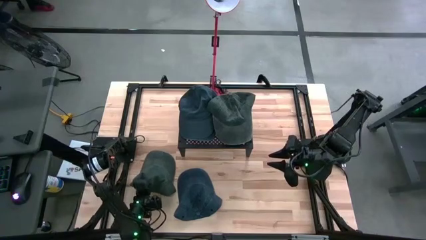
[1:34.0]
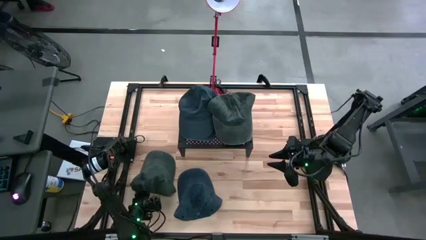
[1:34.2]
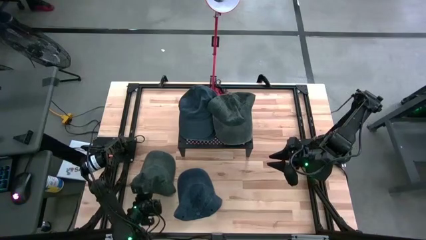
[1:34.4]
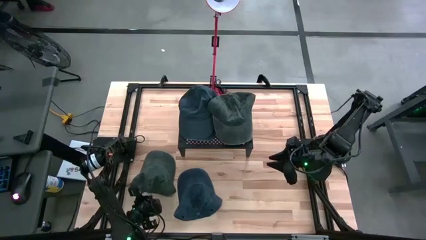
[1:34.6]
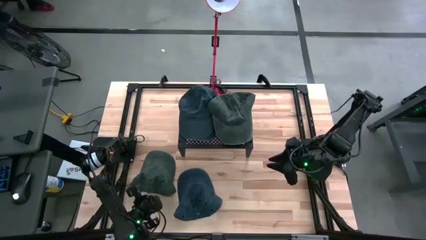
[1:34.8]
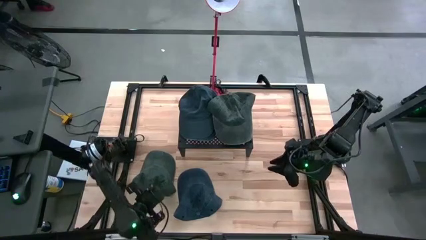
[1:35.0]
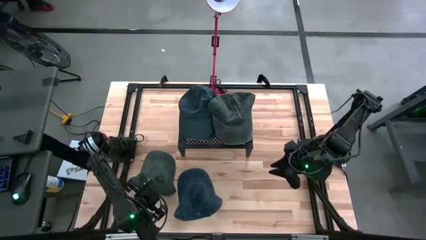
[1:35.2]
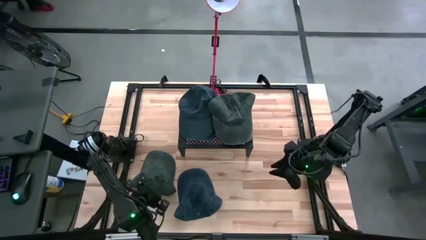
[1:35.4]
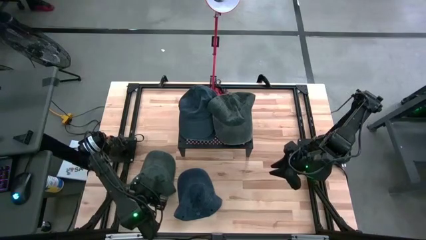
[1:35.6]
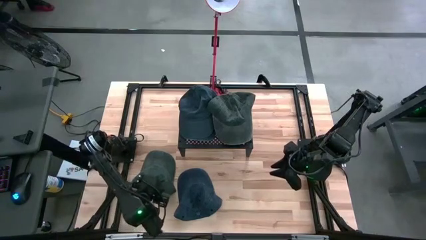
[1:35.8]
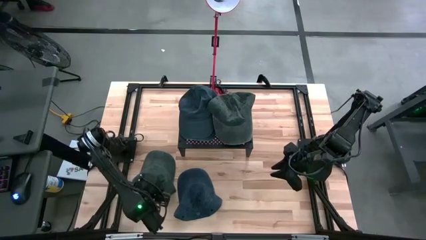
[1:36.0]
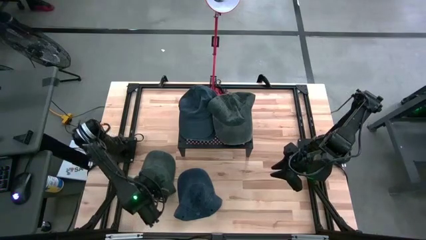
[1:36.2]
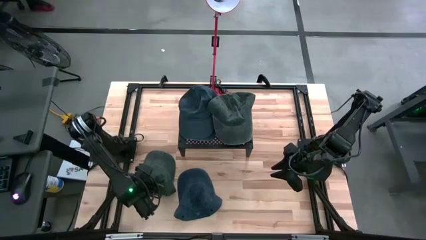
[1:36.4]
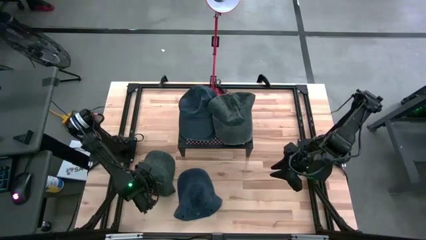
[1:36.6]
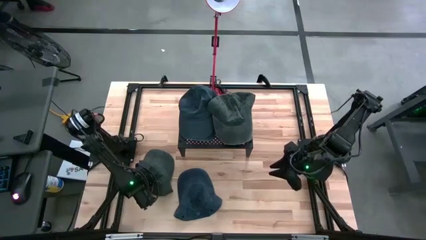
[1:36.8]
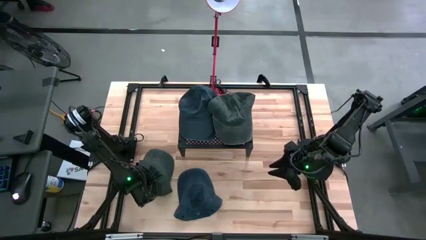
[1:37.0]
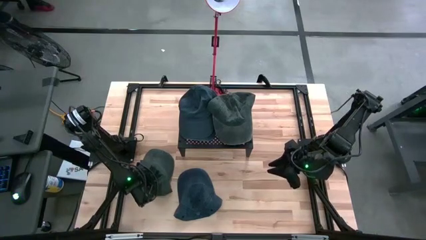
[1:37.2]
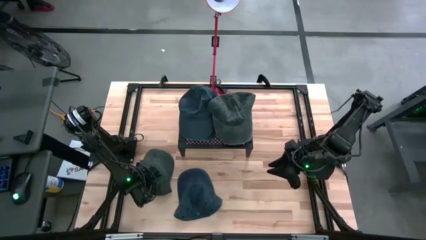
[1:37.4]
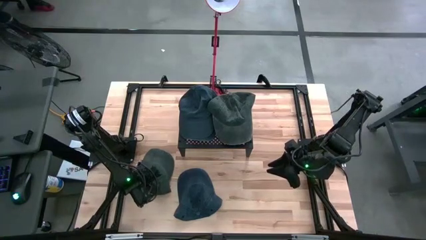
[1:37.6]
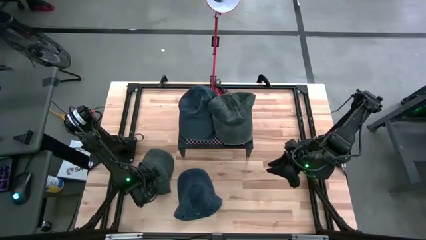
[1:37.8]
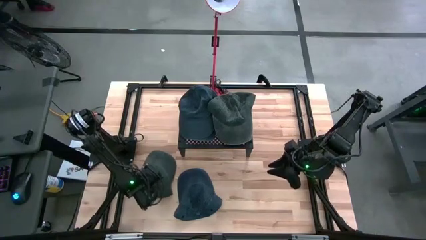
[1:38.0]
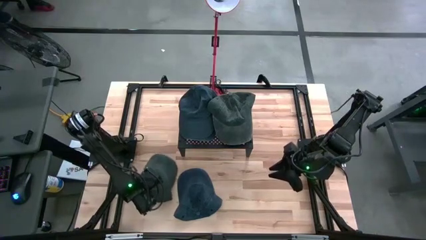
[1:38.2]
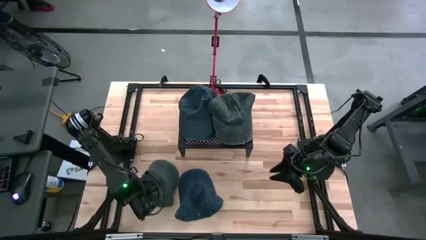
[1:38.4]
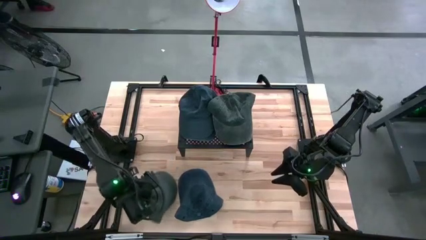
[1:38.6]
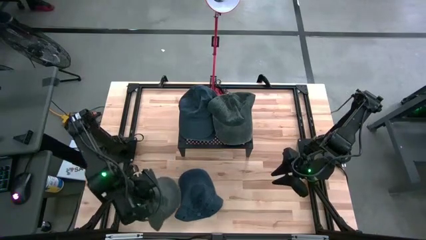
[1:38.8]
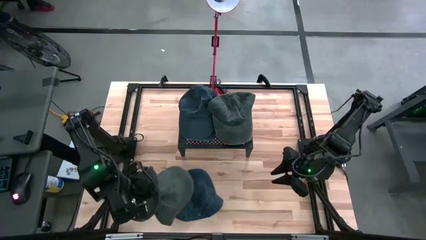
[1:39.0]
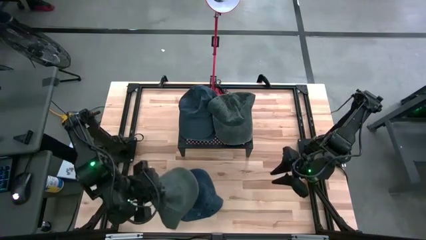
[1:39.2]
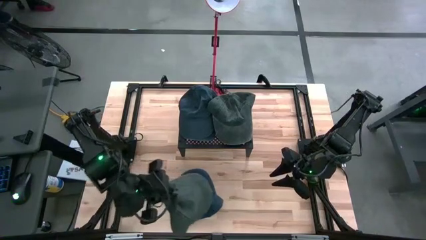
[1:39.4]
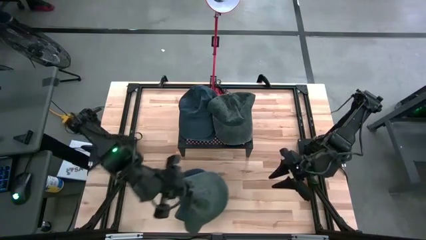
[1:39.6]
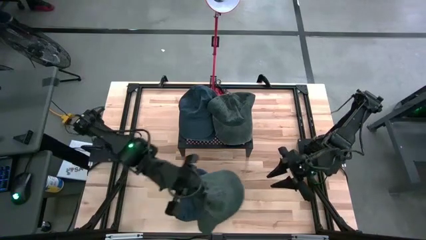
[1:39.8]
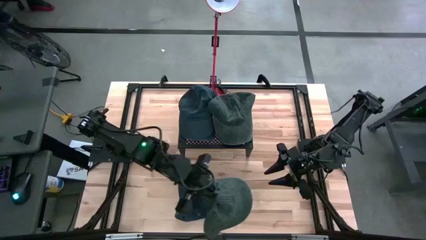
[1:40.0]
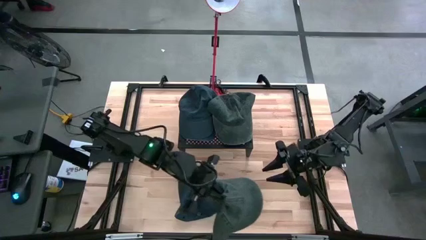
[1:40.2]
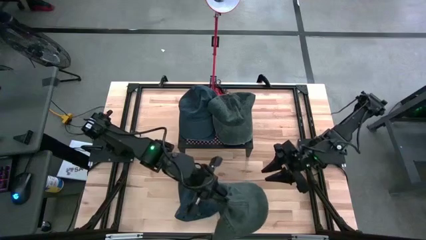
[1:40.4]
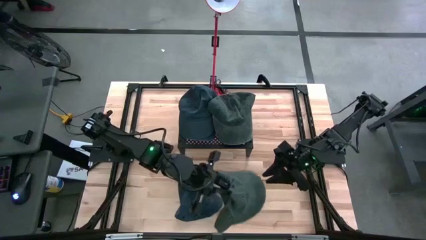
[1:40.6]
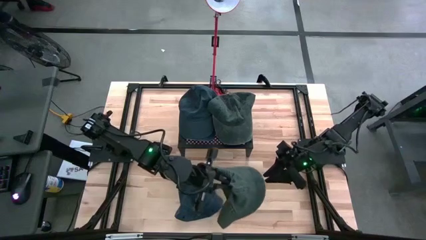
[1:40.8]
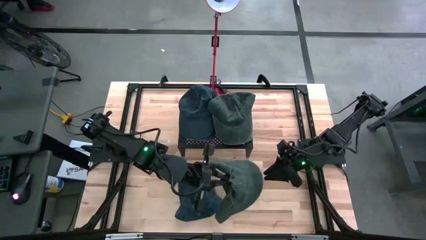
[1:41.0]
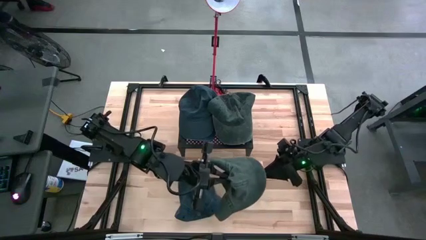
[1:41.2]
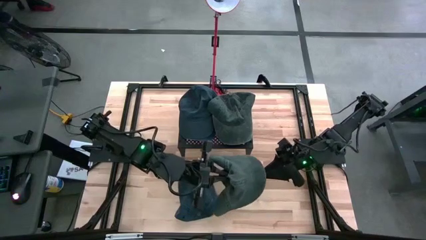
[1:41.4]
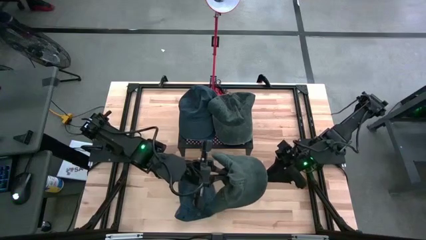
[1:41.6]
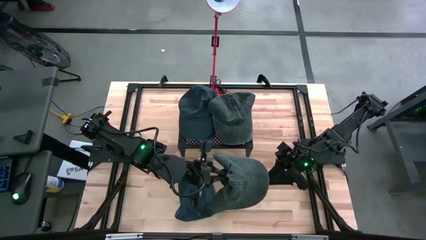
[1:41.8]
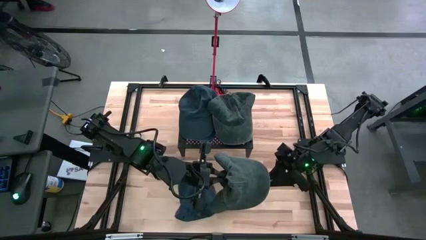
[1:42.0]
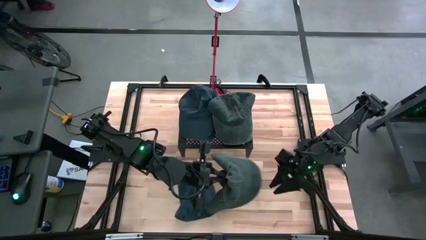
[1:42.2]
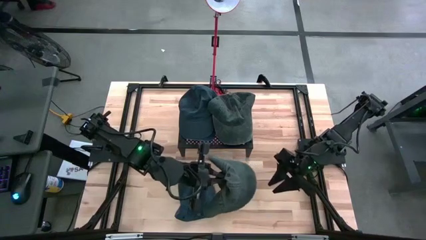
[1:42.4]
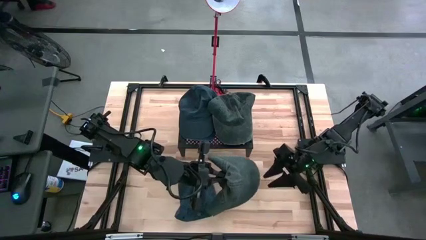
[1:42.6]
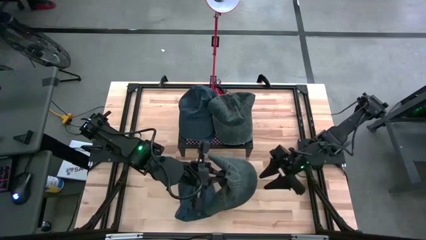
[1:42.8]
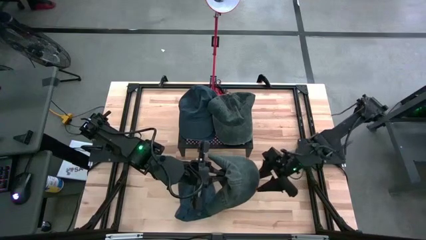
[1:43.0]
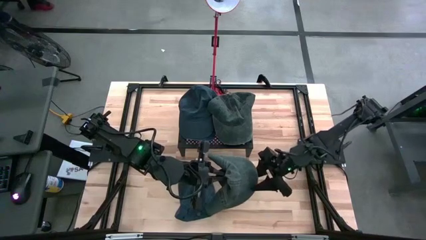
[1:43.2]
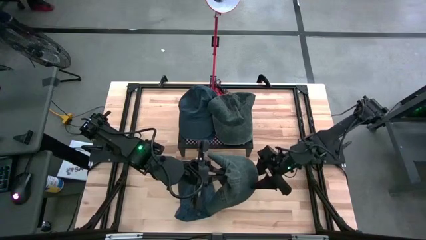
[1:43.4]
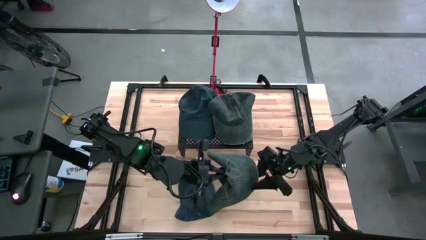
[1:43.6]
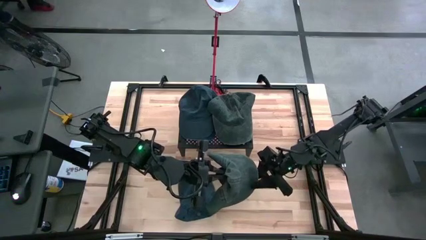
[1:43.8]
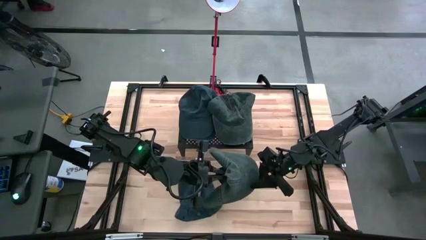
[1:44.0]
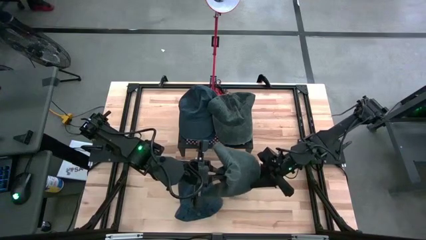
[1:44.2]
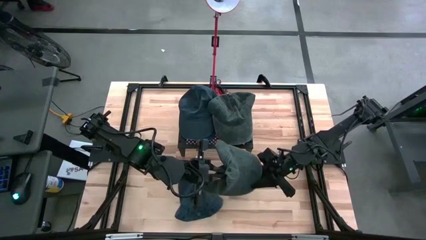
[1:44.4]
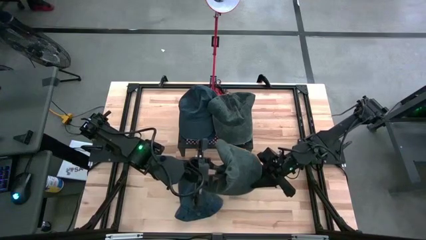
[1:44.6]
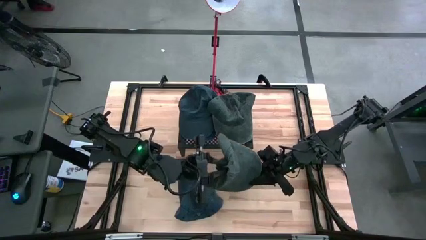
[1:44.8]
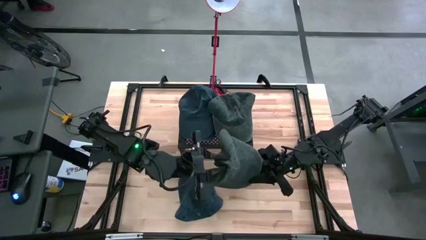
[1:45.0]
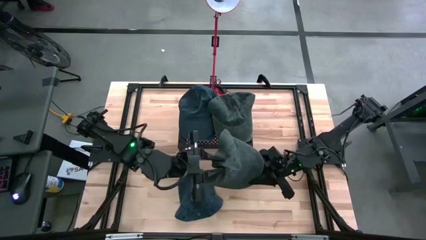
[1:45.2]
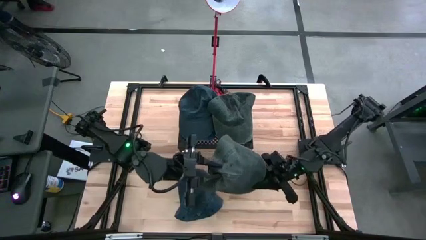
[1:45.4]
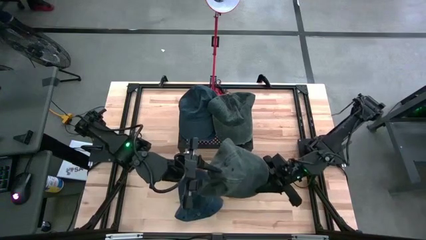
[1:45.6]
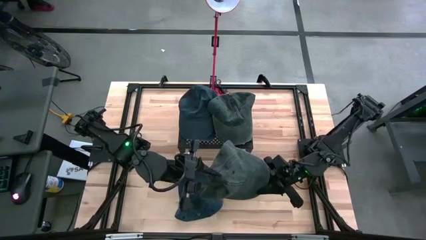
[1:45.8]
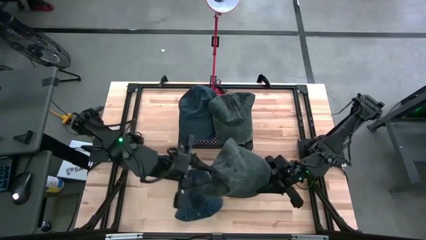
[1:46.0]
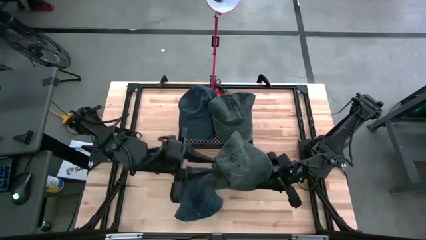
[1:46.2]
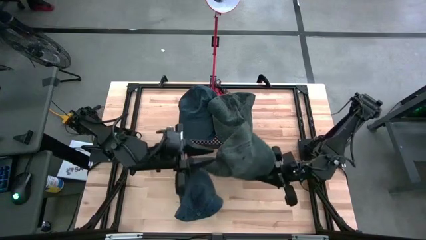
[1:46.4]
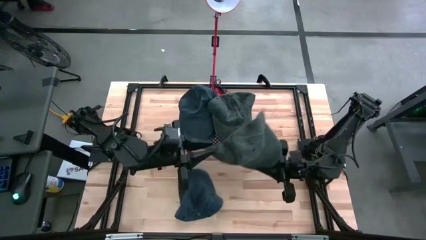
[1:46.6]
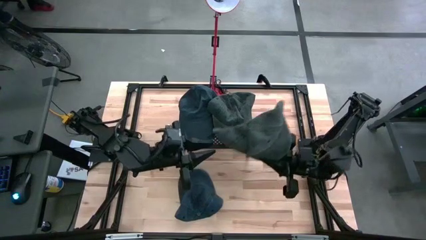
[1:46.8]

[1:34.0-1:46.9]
Task: Pick & Place hat
Stack the gray cap on top of the gray cap on the shelf

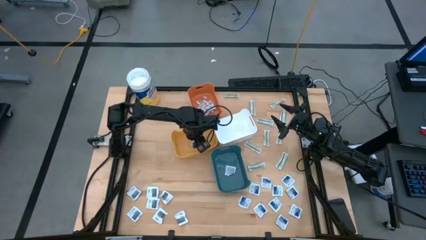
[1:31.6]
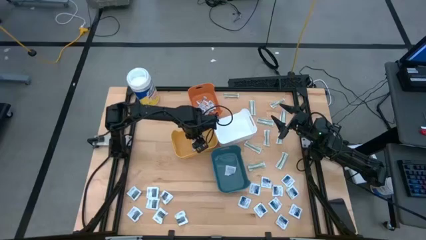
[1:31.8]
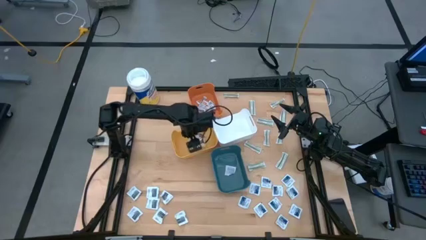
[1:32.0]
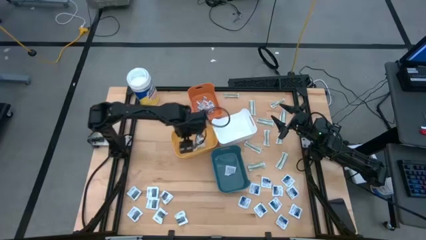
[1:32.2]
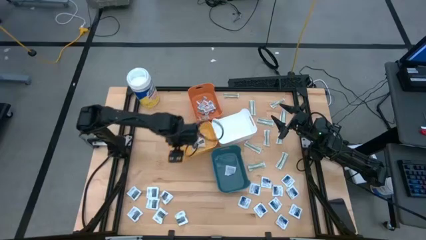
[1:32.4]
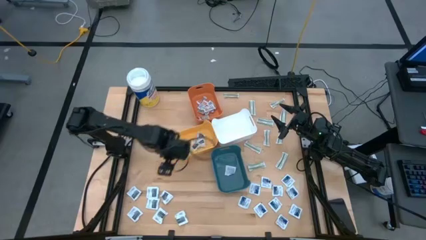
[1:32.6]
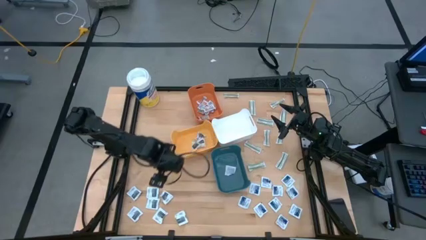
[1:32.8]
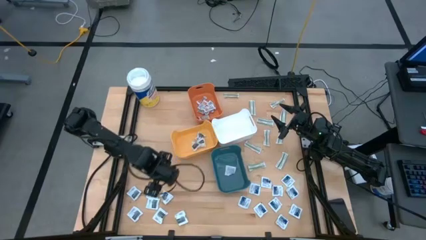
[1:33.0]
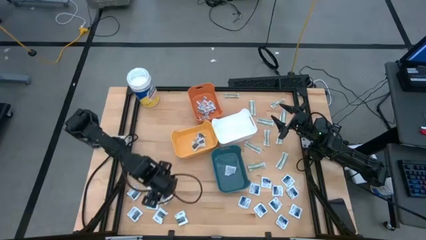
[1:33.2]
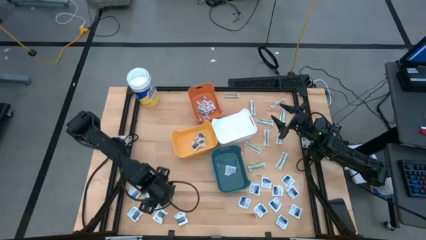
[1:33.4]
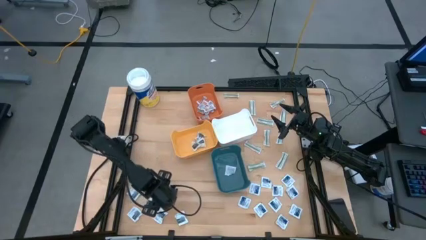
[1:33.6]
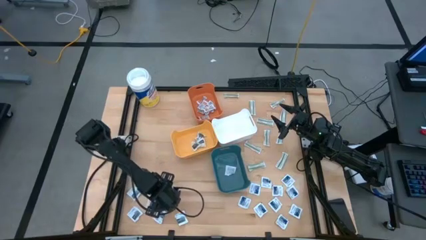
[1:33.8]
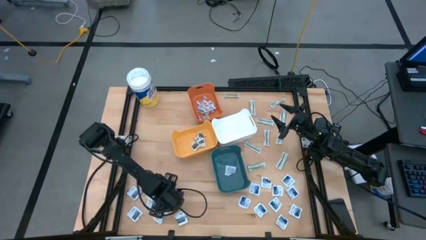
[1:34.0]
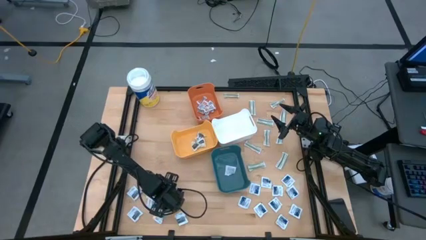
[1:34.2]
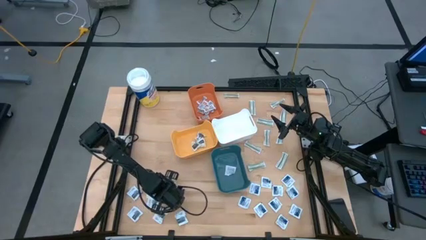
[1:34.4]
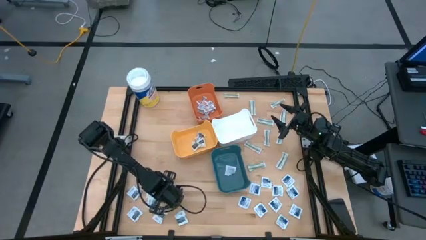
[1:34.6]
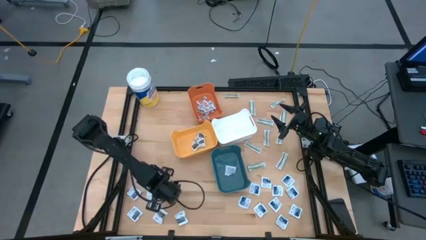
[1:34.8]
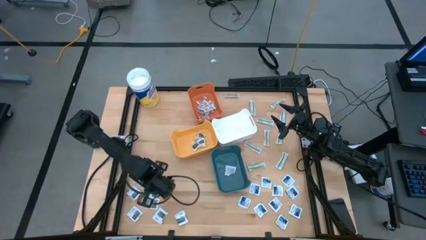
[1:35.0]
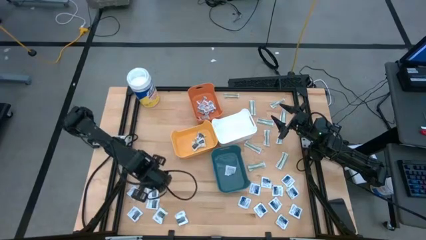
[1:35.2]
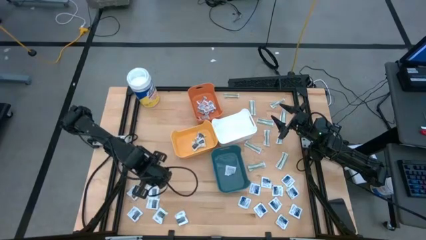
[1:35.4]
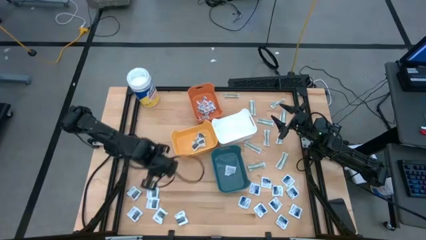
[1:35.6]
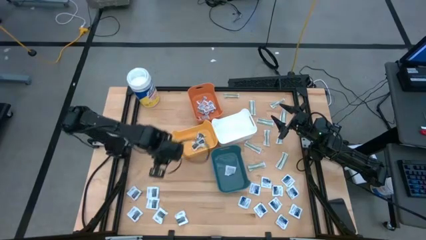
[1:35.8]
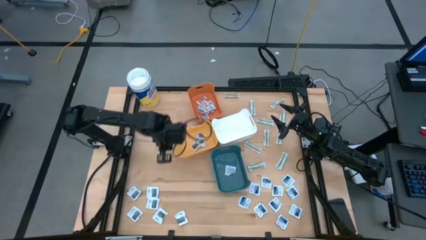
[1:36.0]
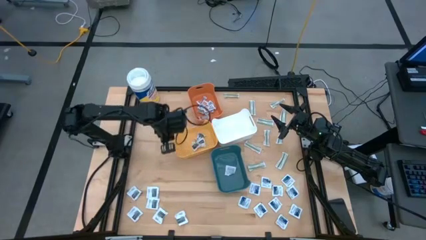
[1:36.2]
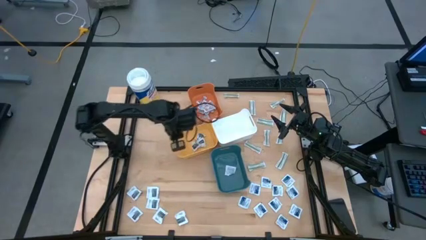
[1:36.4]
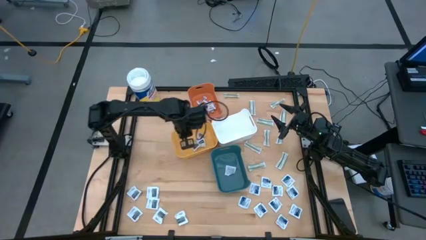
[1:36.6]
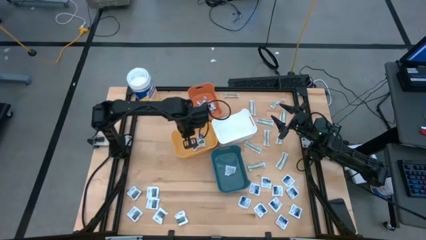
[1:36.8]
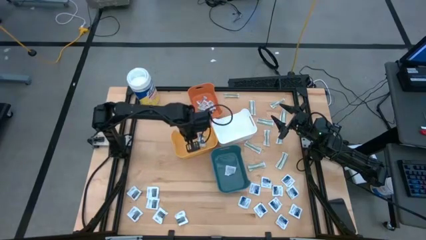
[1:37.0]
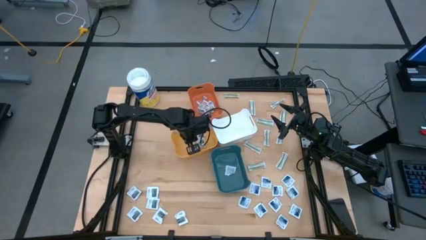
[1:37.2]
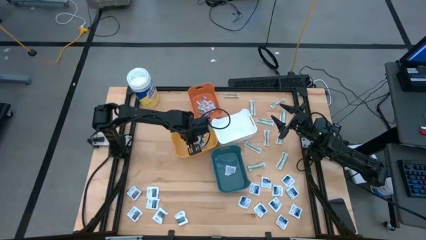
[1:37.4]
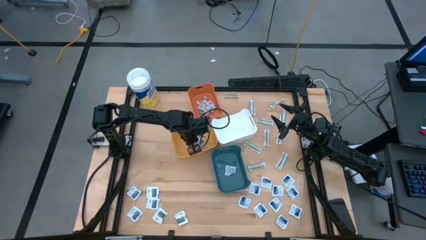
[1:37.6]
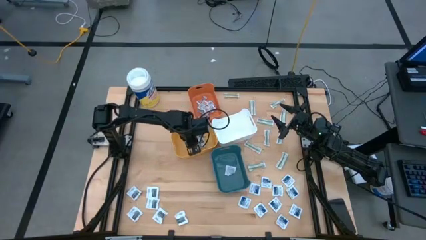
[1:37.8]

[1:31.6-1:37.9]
Task: Pick & Place First Aid Supplies
Put the black towelette pack into the yellow bin
